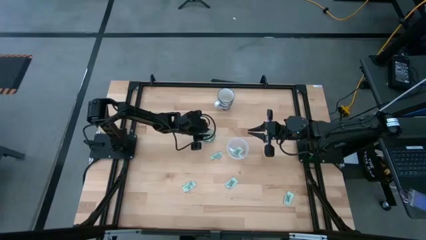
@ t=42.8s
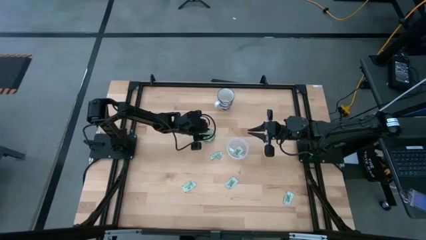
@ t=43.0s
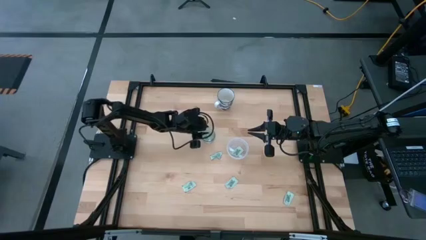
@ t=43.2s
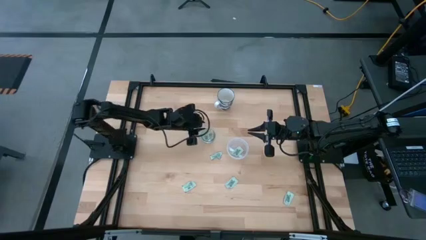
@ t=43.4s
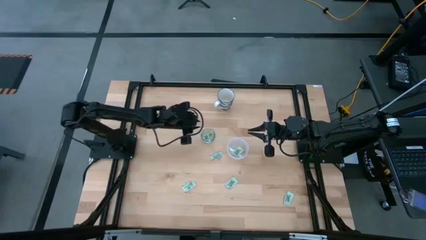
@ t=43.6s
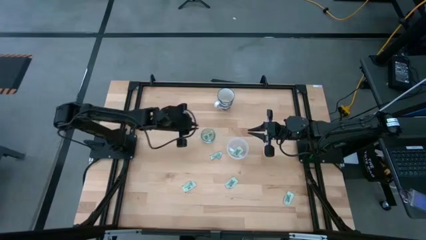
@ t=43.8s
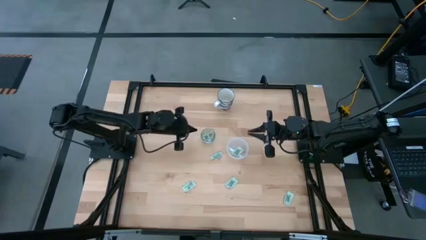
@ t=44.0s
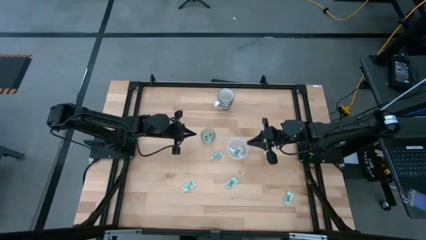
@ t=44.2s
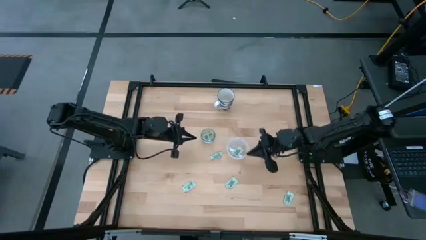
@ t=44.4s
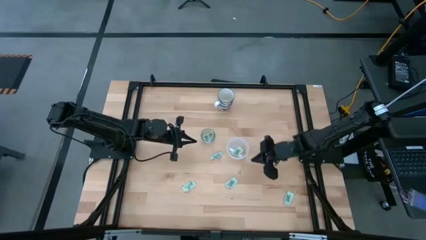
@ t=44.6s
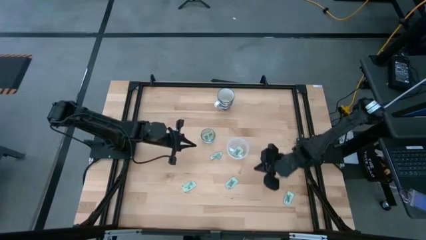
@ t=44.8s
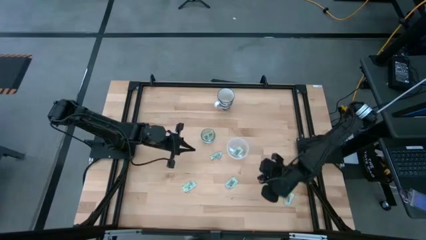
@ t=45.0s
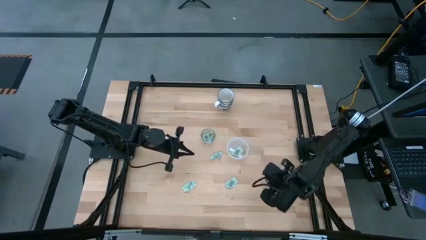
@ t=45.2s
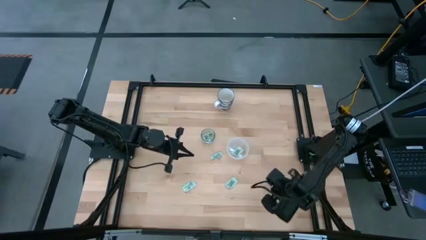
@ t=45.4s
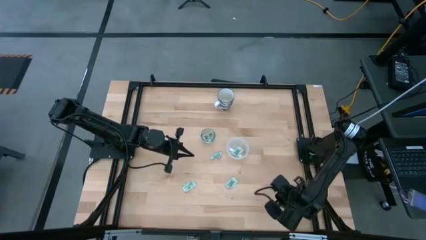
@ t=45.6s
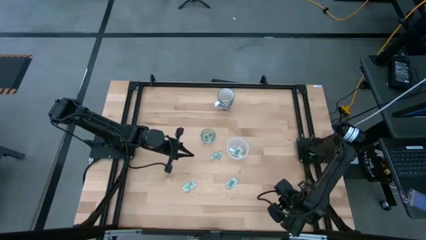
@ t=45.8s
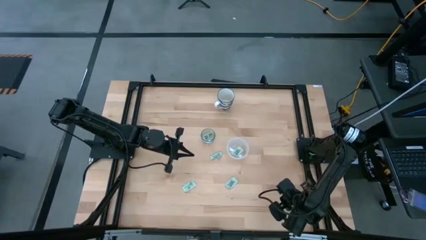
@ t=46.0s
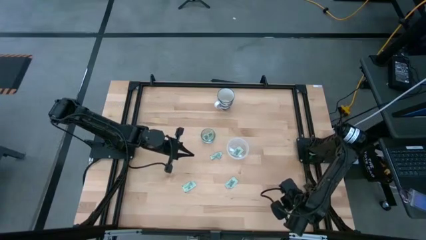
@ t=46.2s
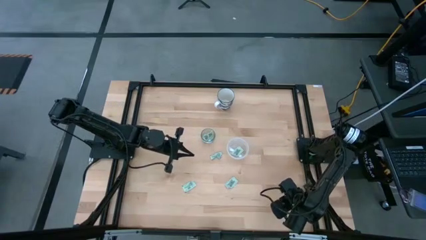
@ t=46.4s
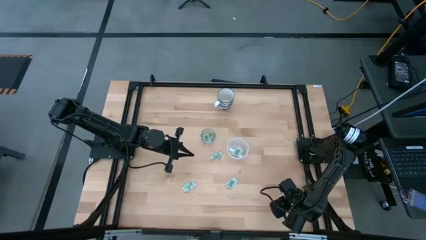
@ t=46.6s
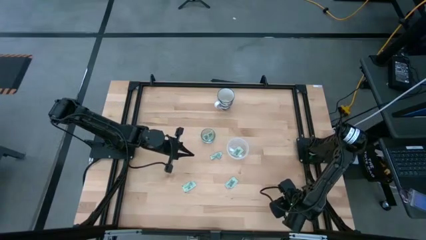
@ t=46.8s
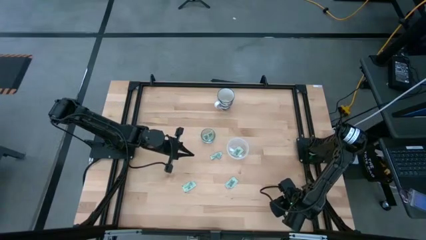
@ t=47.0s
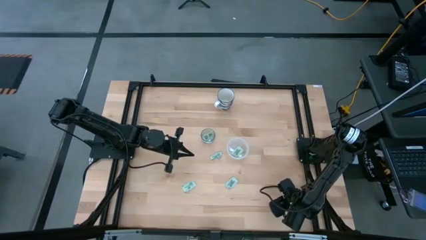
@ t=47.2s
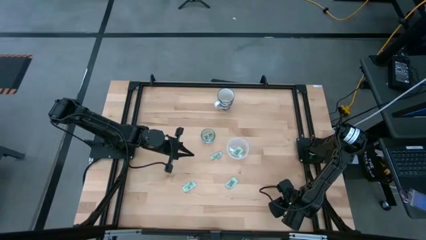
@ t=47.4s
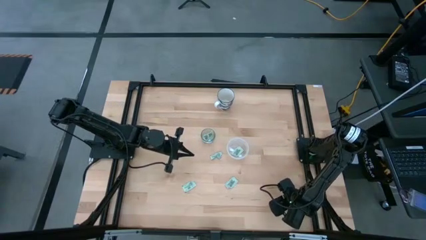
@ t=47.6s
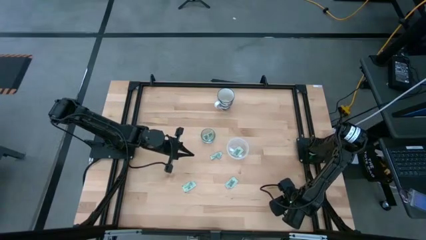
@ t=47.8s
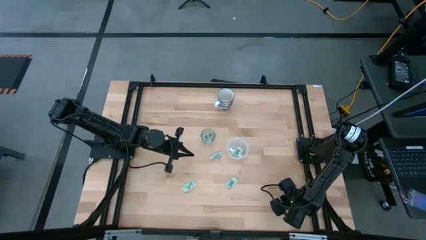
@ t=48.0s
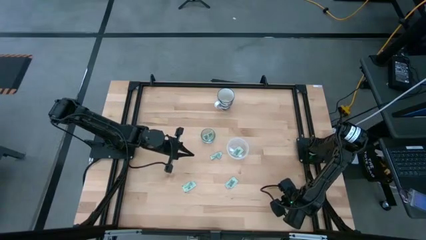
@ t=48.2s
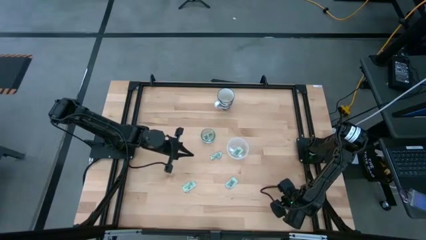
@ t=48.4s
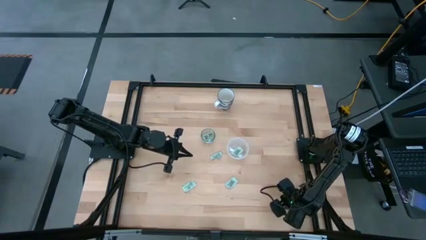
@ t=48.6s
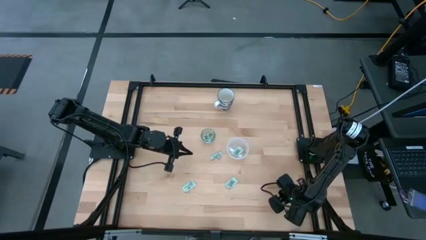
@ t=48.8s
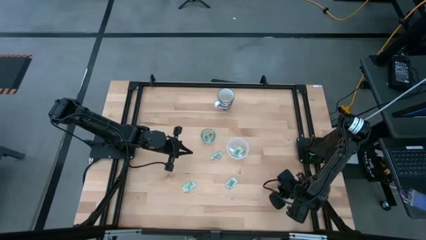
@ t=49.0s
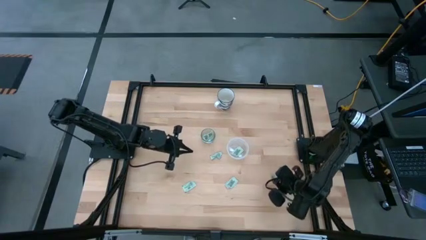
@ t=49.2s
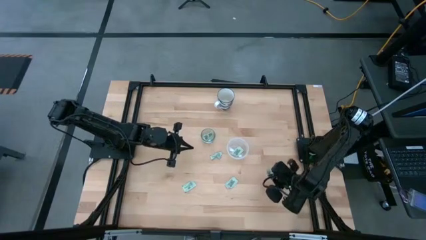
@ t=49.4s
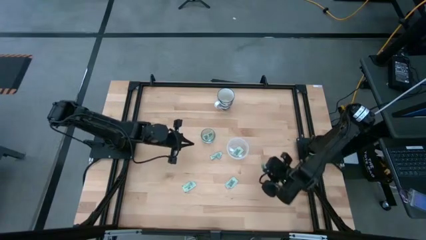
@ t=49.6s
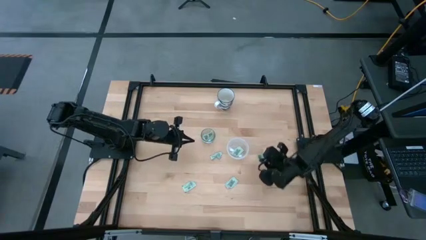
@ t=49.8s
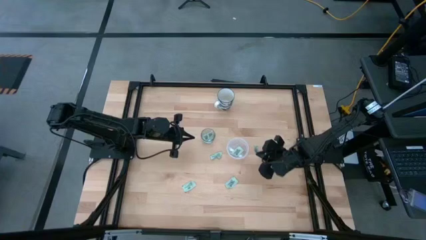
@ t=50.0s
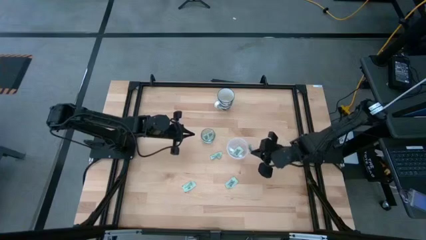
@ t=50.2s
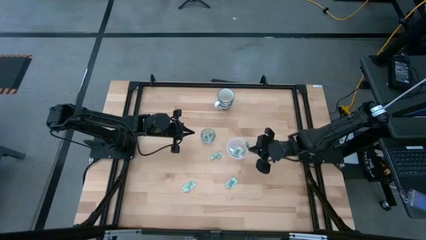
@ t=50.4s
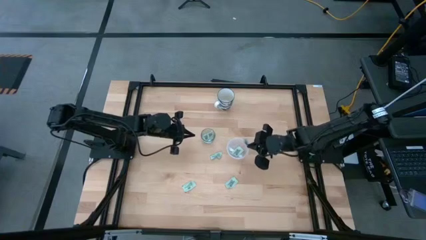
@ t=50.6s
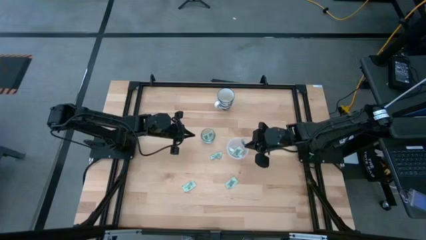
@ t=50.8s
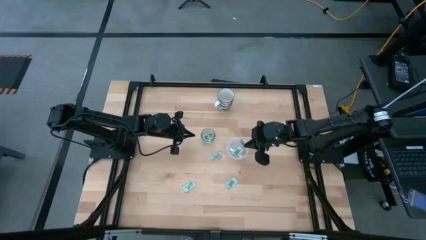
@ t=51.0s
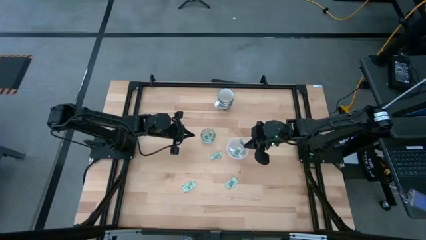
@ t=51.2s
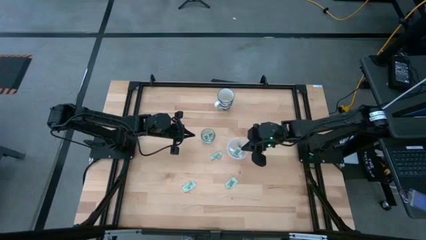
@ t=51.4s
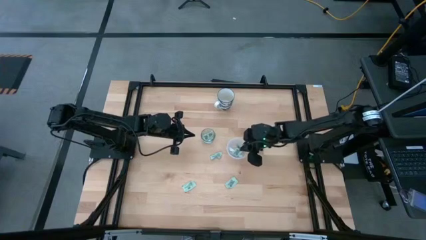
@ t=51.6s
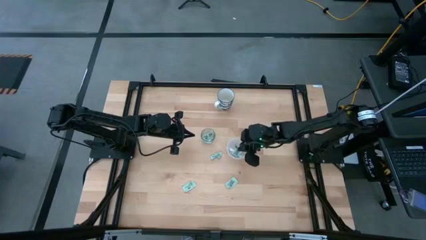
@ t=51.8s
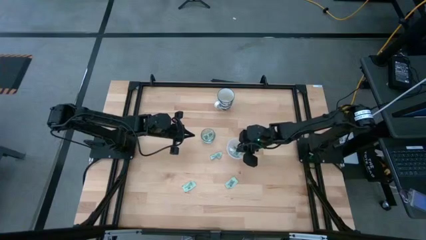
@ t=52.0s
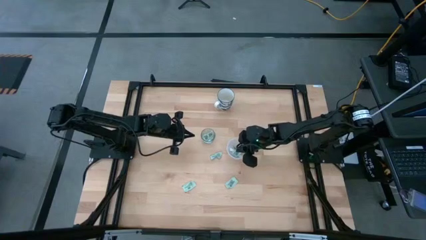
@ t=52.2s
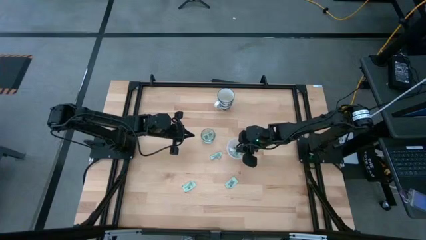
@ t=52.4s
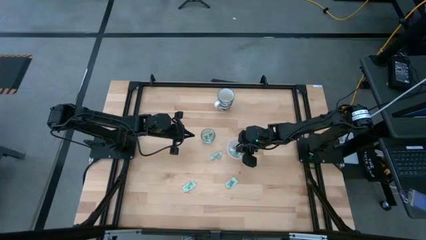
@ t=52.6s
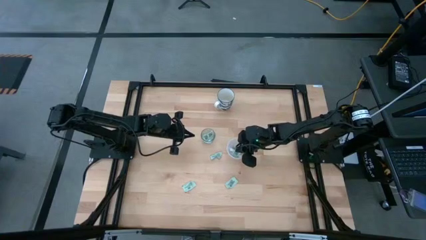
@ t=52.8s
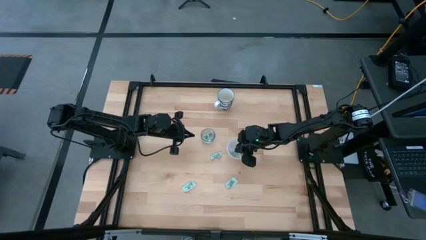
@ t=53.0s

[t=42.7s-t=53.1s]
Task: Pick and place Stevia / Truvia into bins
Put the stevia packet into the transparent container

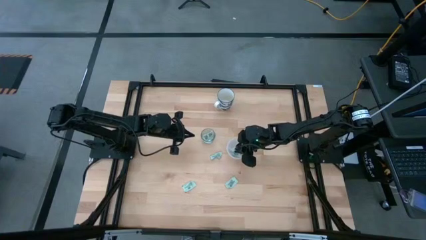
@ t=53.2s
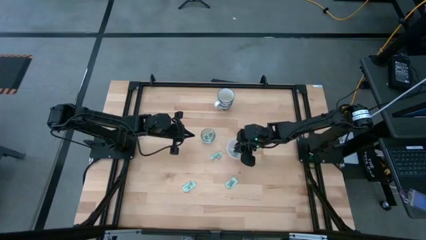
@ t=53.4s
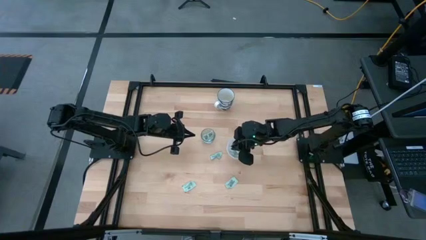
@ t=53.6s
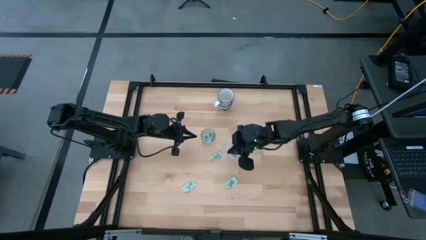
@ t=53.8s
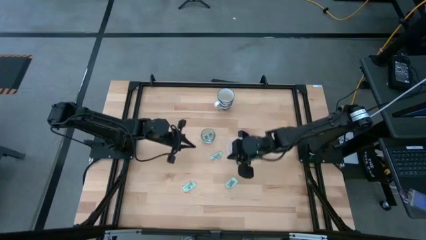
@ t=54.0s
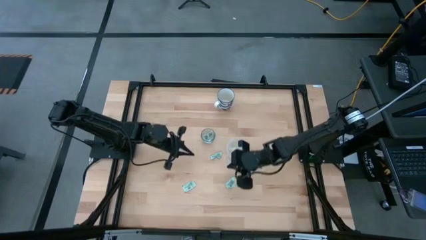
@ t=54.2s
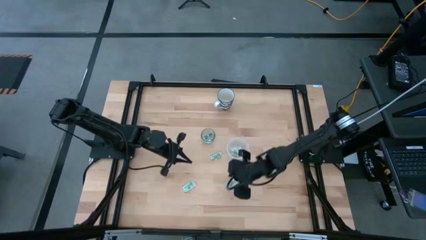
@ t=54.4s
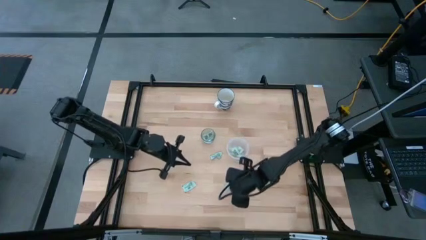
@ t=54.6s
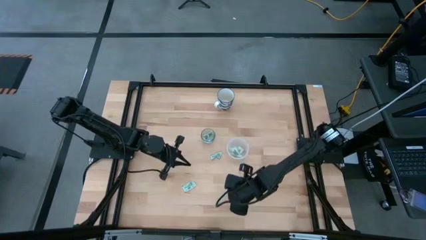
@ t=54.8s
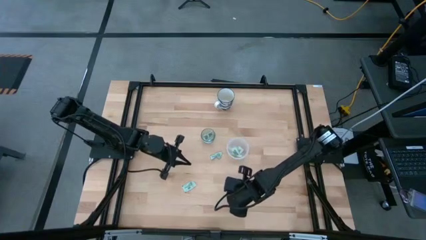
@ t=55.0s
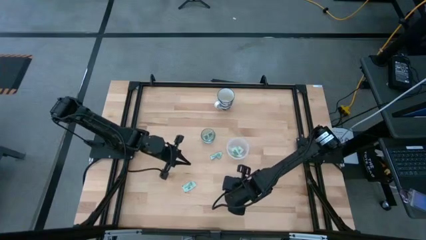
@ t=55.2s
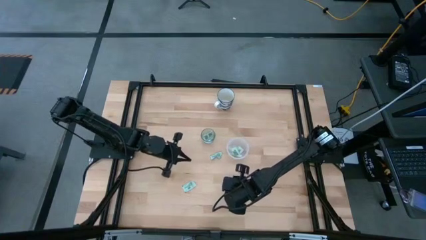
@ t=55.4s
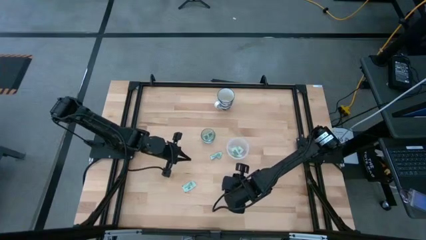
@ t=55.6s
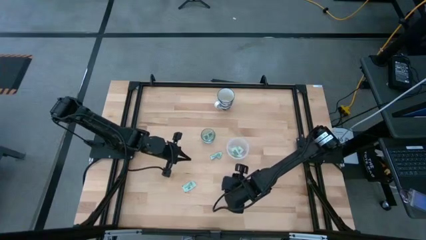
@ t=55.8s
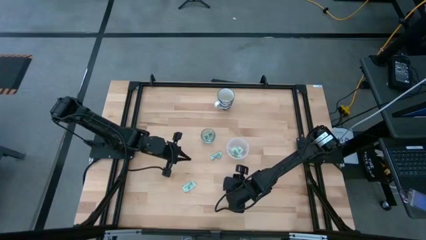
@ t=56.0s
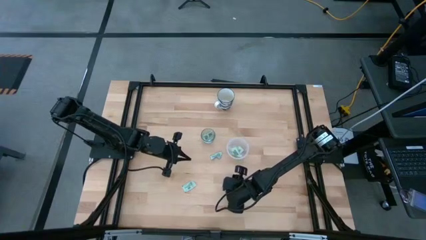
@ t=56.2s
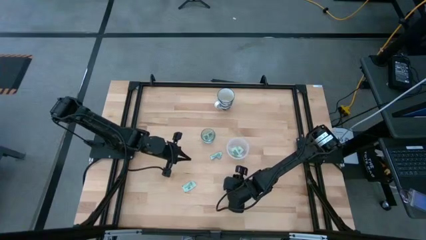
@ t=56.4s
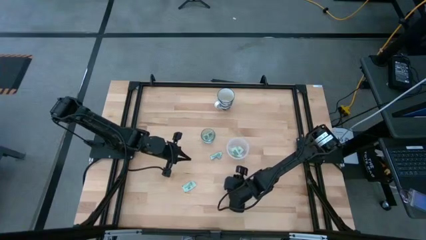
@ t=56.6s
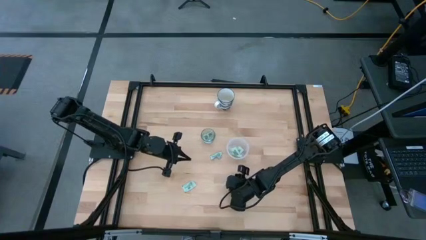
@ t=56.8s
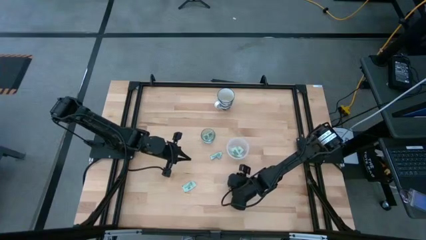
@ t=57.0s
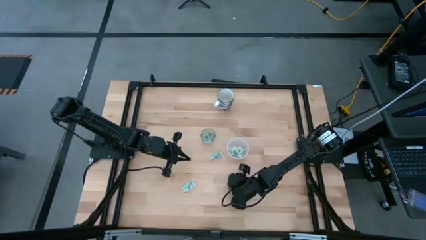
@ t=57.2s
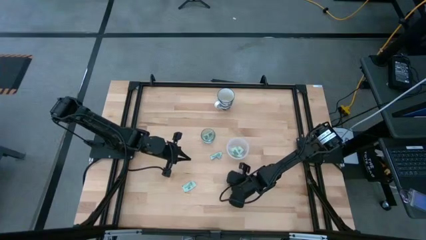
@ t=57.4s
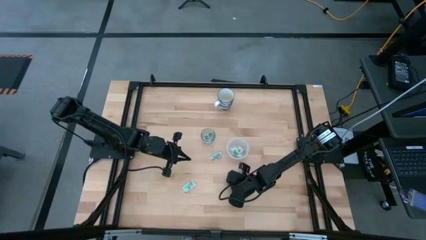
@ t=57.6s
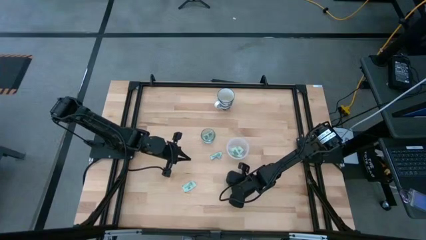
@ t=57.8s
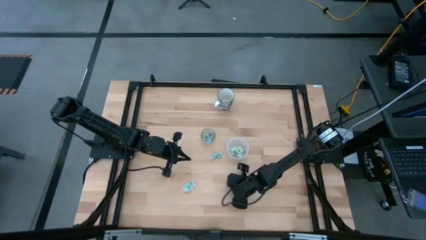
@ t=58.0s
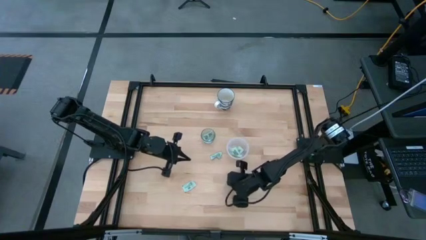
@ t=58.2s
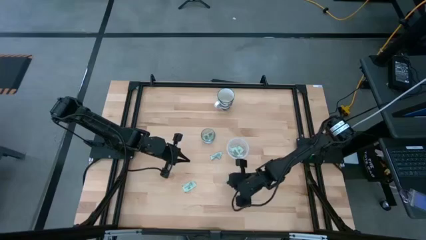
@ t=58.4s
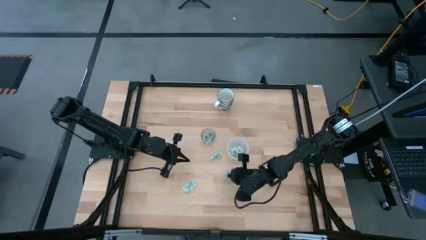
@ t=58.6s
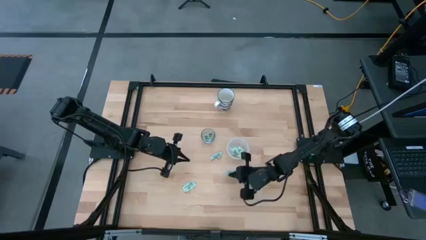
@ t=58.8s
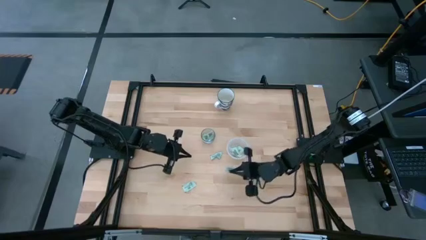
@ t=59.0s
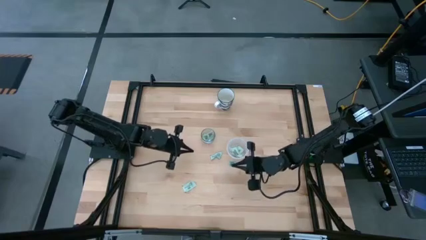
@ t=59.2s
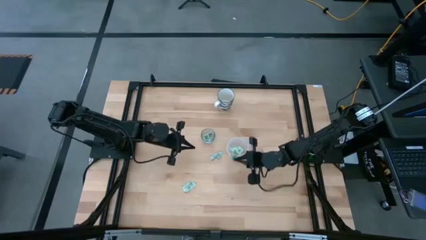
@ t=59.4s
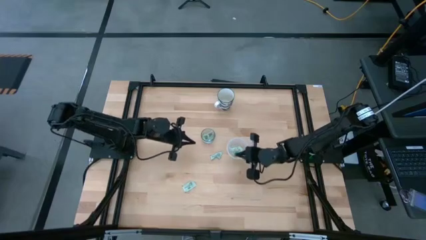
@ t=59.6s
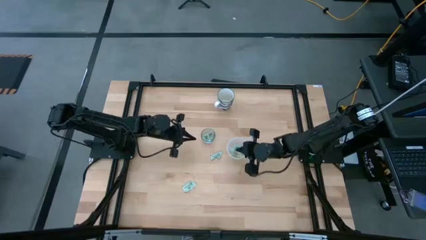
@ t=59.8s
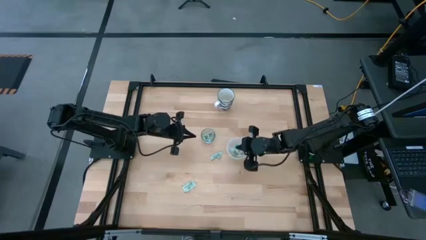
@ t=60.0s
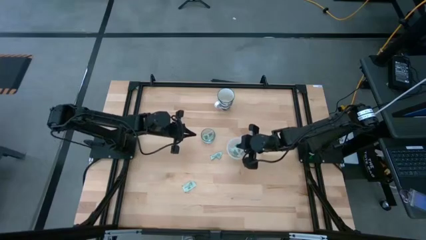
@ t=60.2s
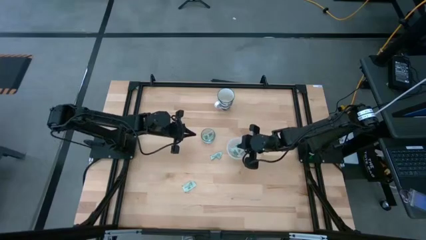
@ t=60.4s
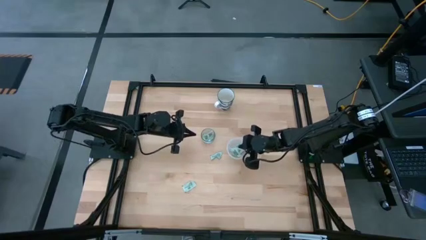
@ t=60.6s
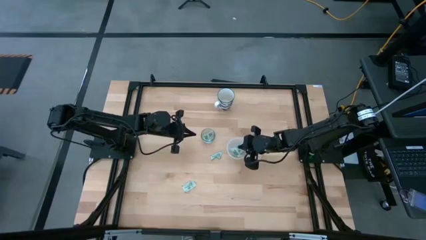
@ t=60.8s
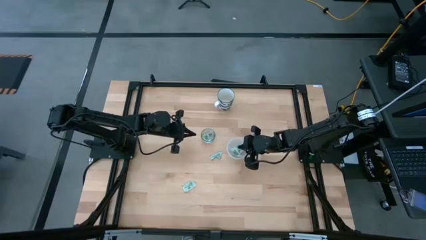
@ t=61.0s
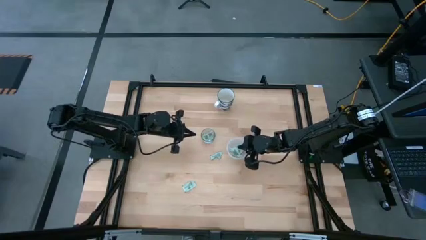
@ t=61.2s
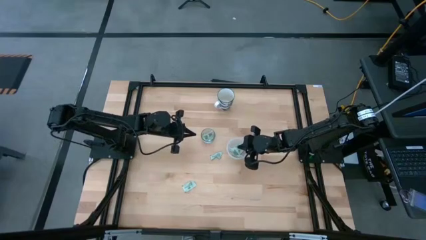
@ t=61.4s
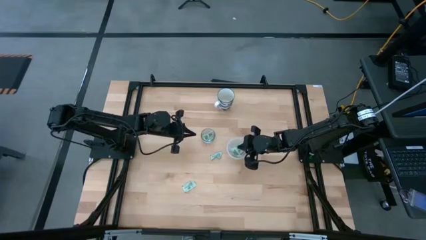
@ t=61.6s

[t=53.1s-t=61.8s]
Put the stevia packet into the transparent container
